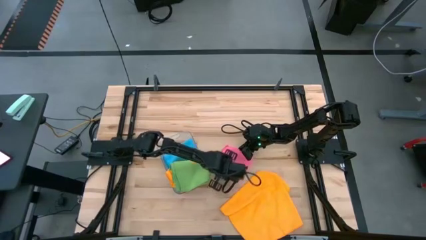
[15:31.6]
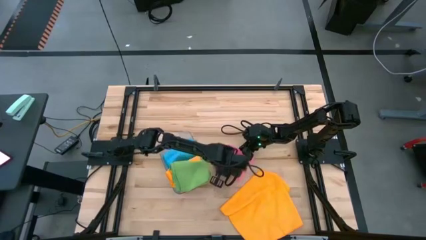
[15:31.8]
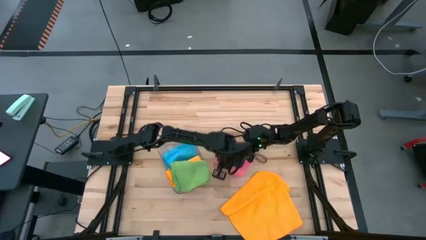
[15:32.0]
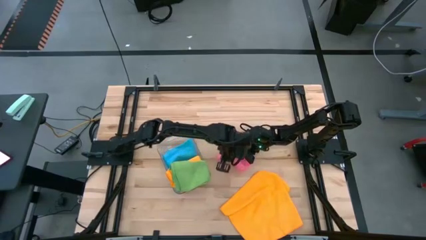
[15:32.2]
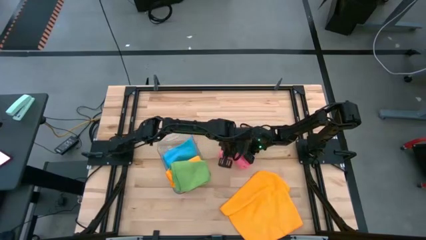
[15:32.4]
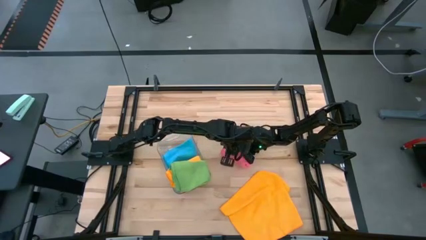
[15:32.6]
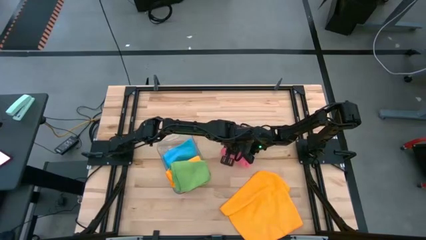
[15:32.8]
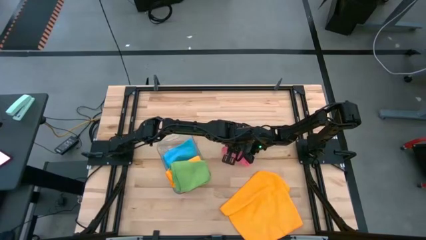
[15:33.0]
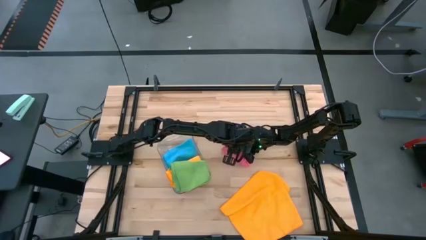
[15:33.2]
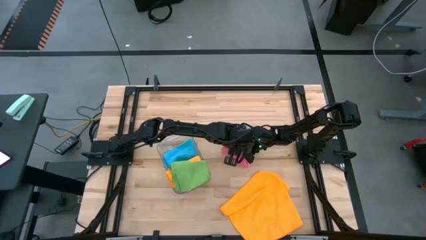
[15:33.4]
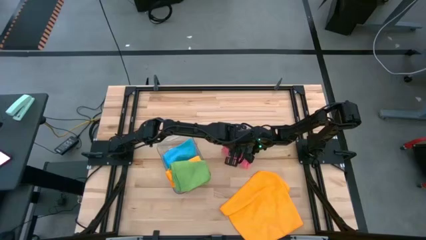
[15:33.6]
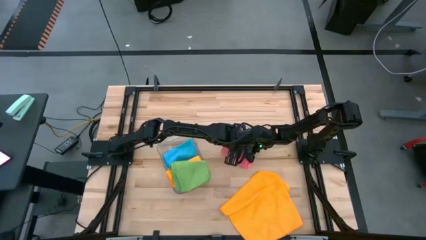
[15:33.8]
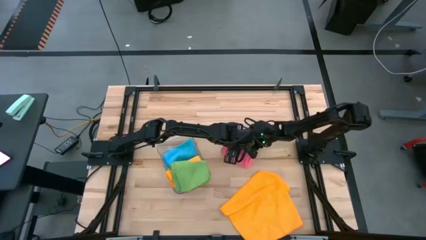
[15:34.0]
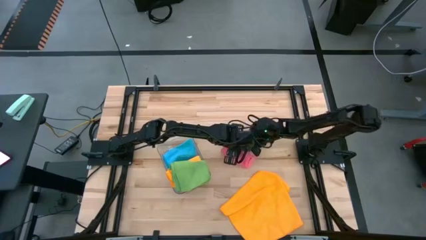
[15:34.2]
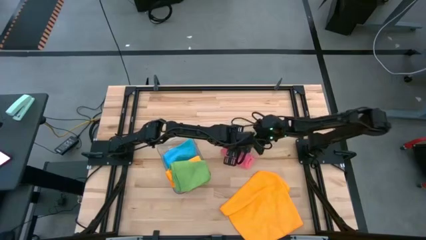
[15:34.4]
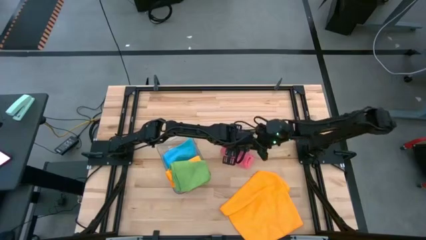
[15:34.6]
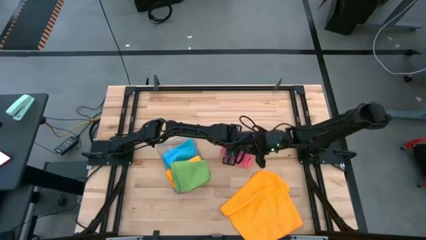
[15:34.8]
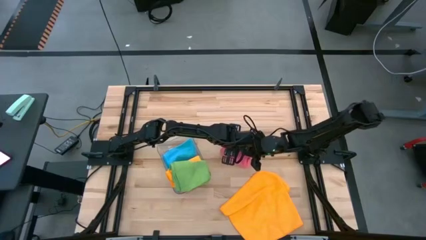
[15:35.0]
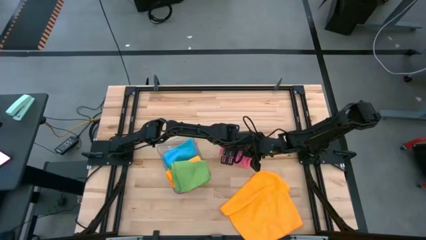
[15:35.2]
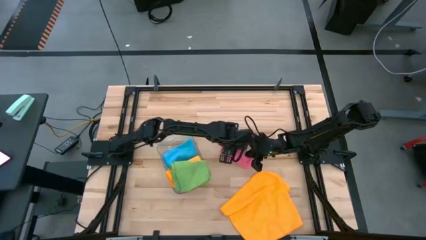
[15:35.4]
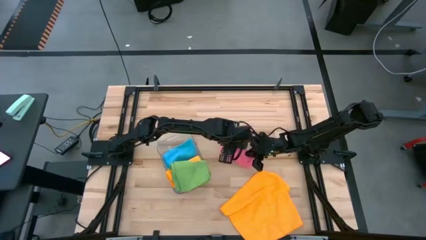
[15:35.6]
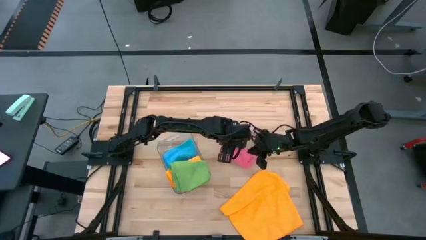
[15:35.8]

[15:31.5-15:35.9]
Task: Fold microfiber towels
Fold the pink towel
